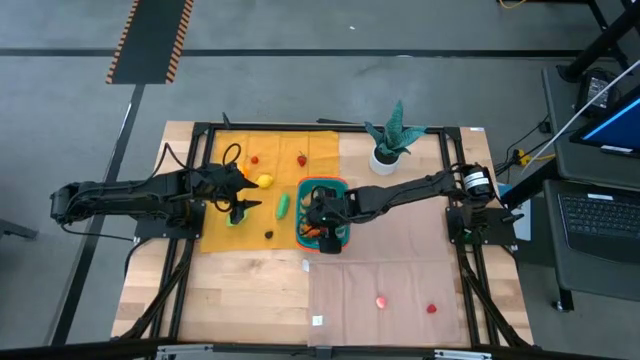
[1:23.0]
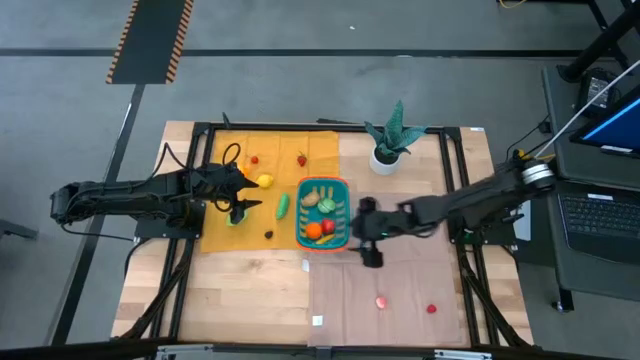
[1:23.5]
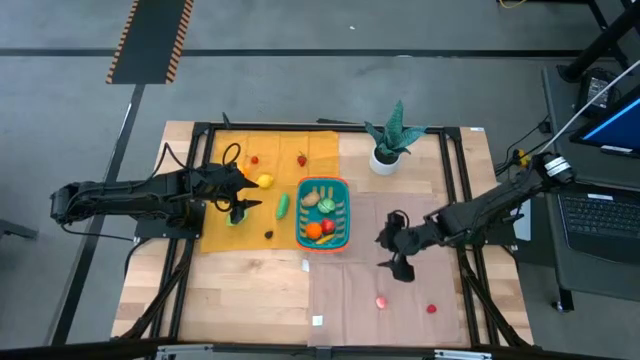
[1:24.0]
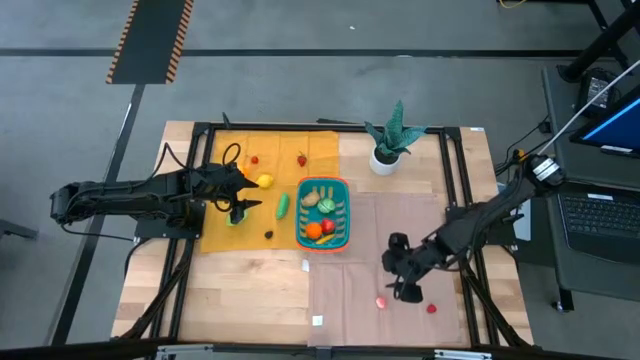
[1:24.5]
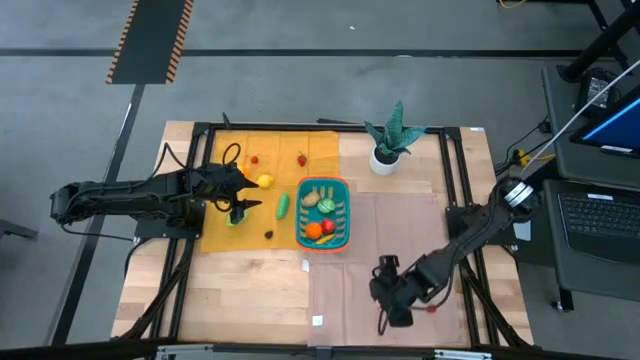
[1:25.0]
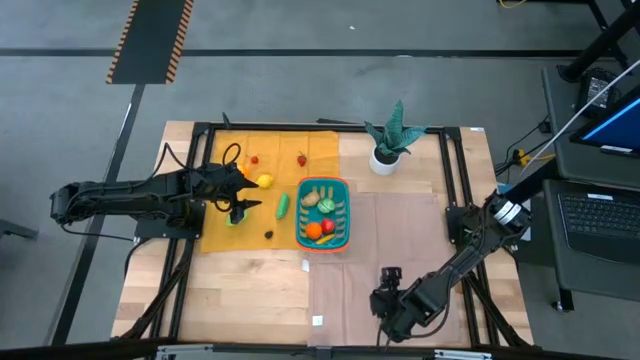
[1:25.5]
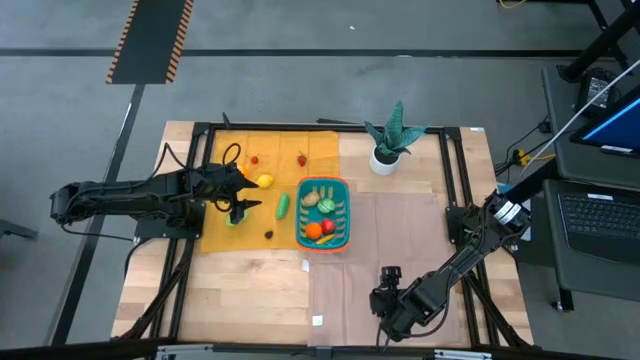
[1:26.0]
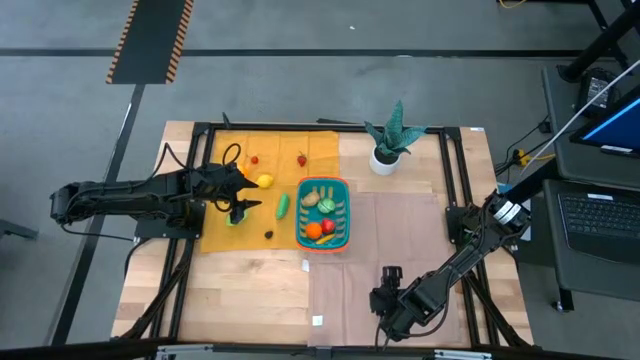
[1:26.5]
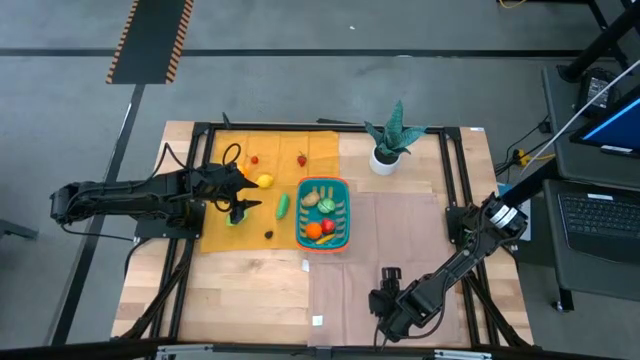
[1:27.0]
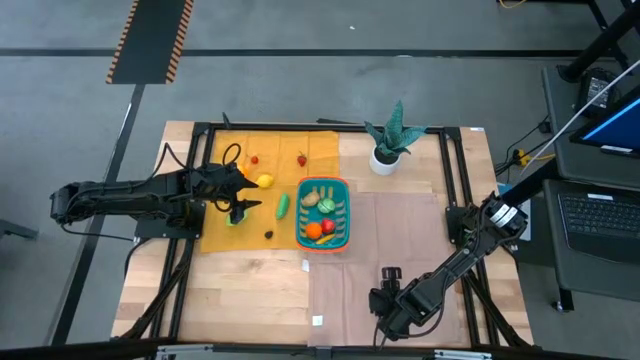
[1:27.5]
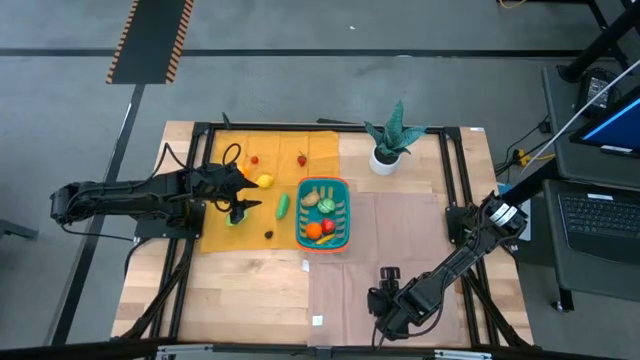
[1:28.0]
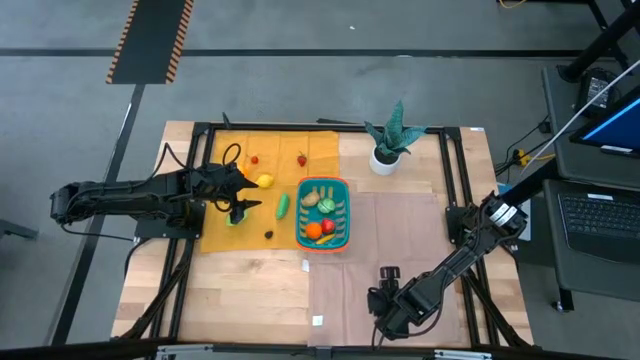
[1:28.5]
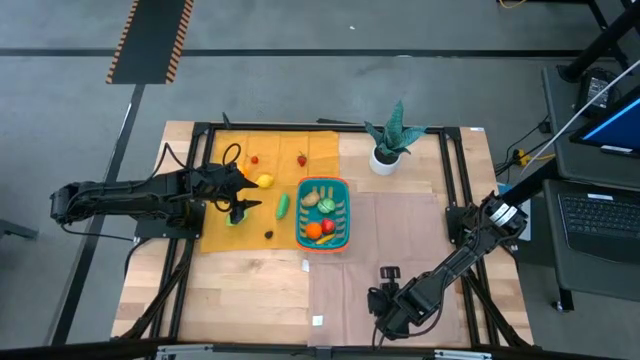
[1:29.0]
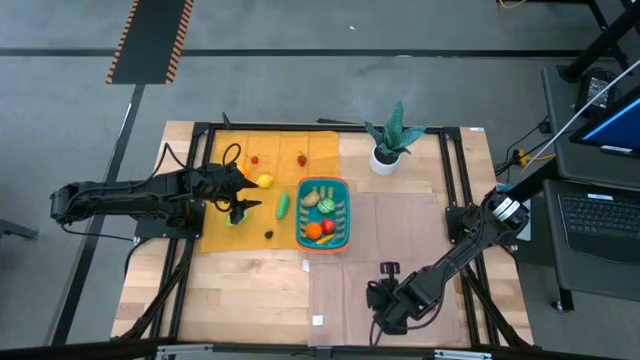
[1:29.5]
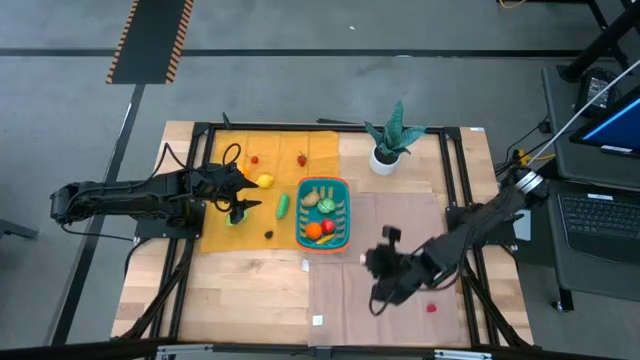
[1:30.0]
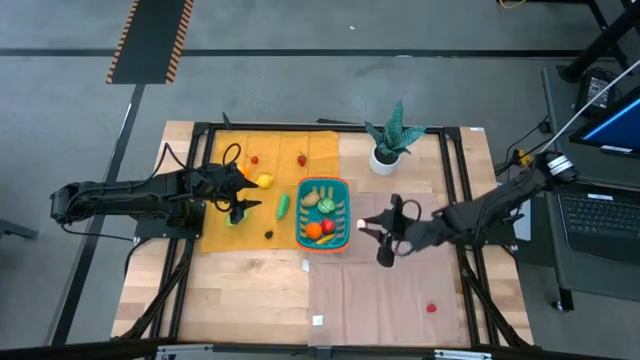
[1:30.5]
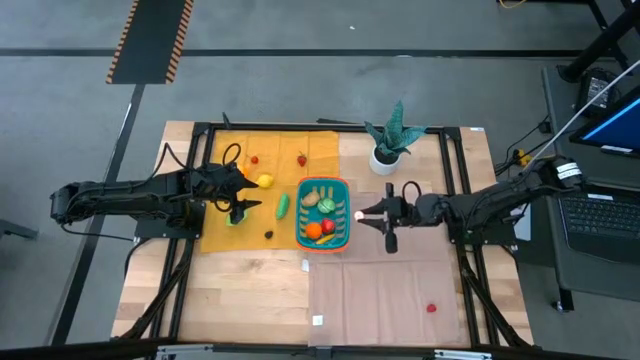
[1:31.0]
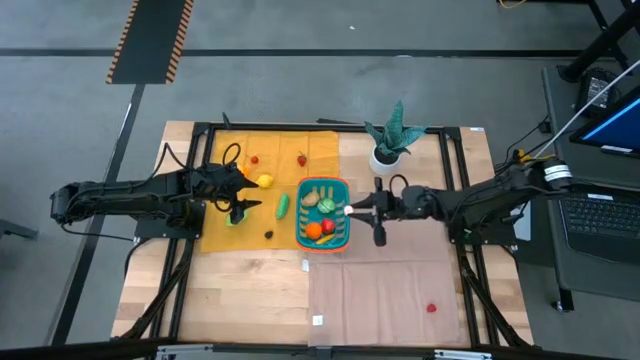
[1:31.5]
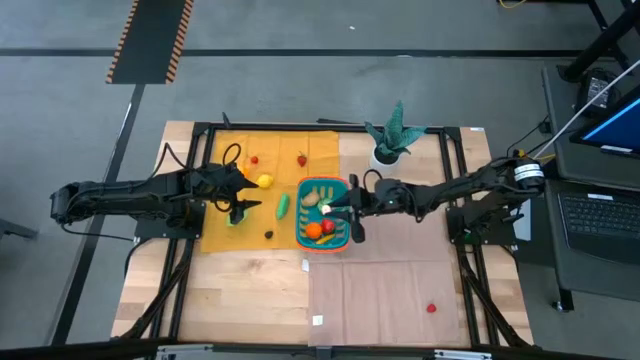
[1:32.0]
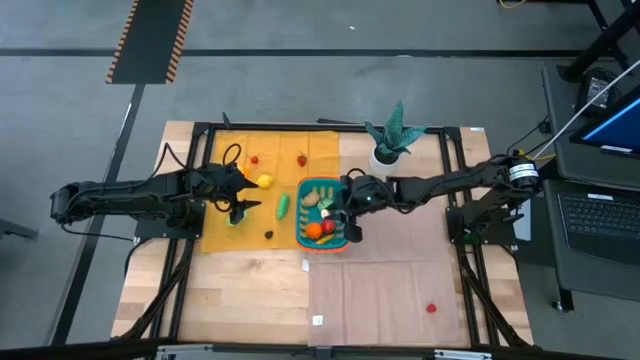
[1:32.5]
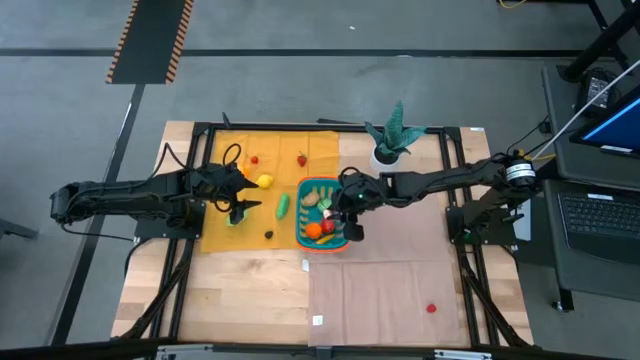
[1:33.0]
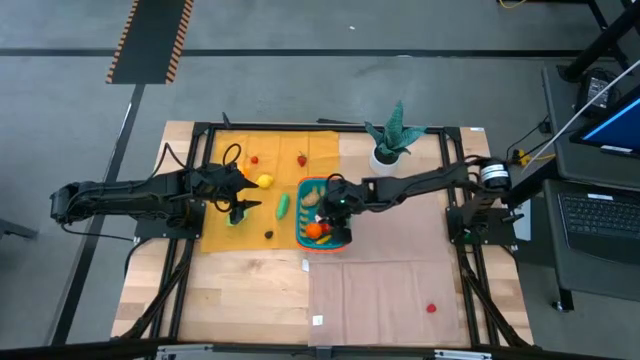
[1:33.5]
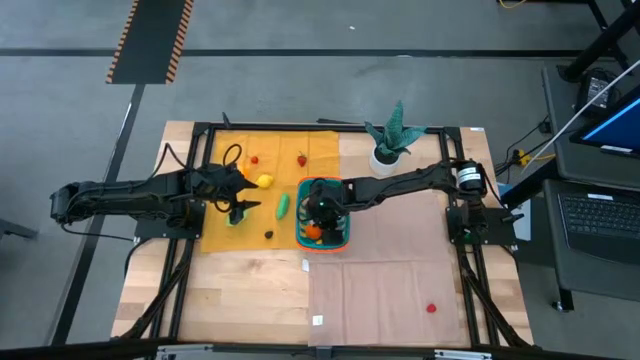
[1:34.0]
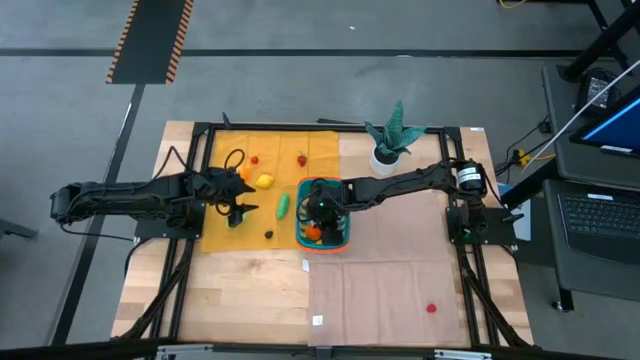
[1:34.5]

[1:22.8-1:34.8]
Task: Pick and placing Produce into tupperware
Put the apricot into the basket

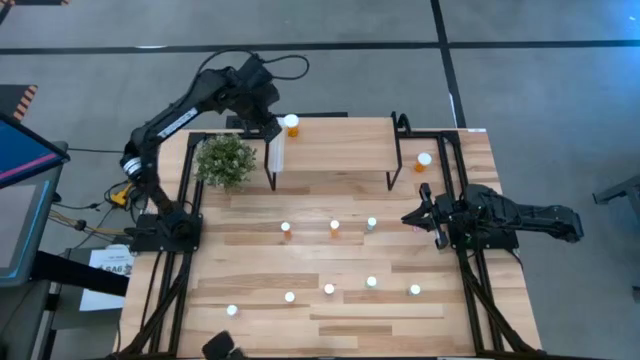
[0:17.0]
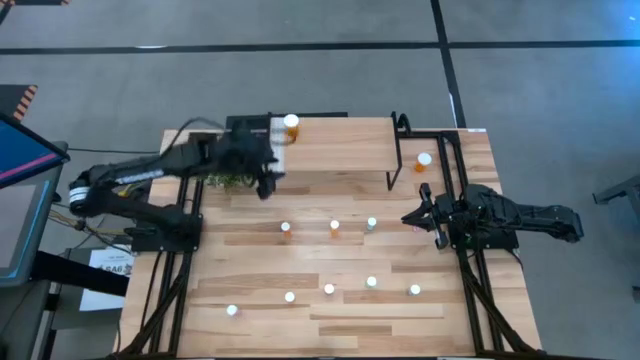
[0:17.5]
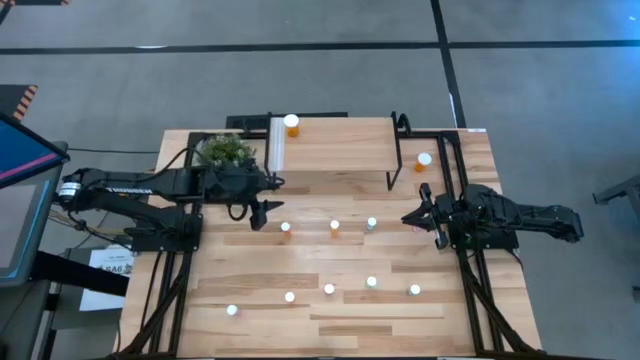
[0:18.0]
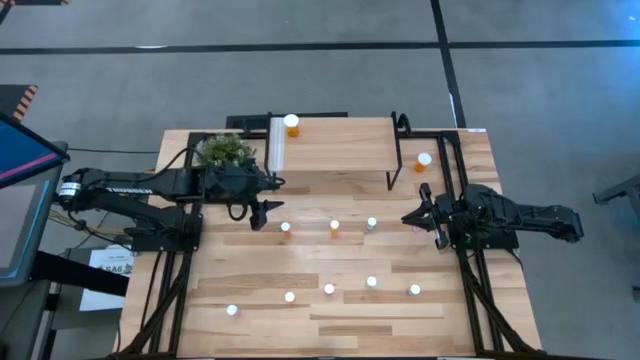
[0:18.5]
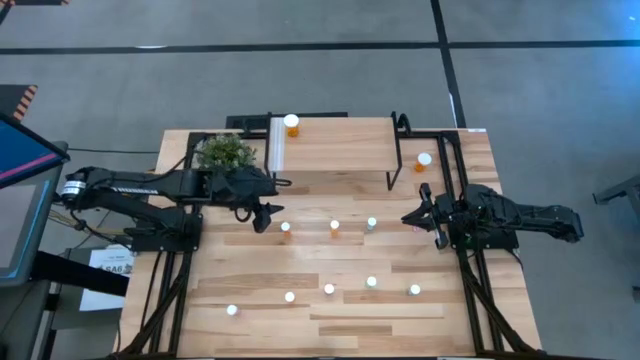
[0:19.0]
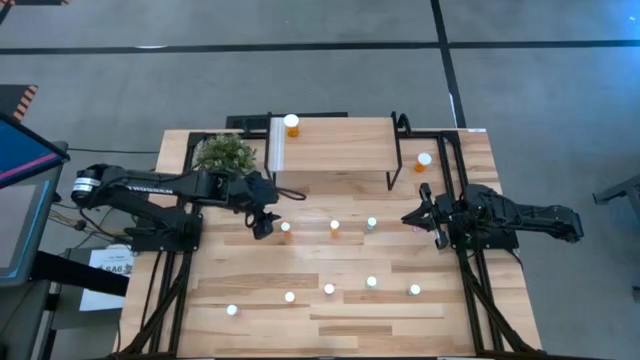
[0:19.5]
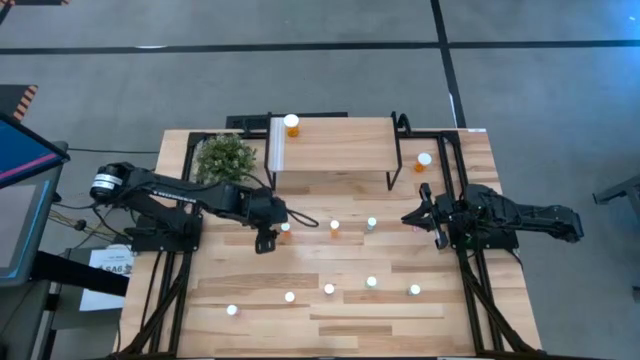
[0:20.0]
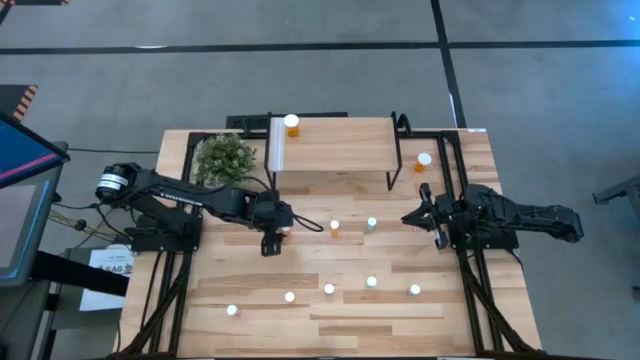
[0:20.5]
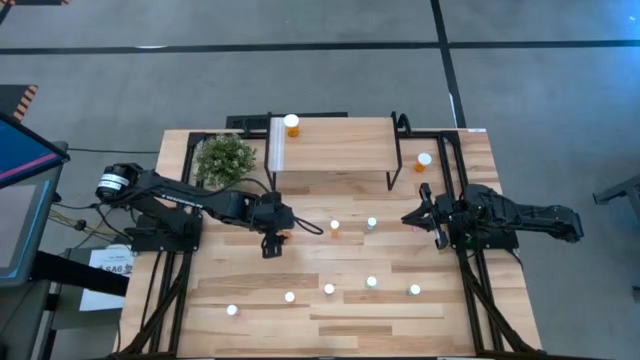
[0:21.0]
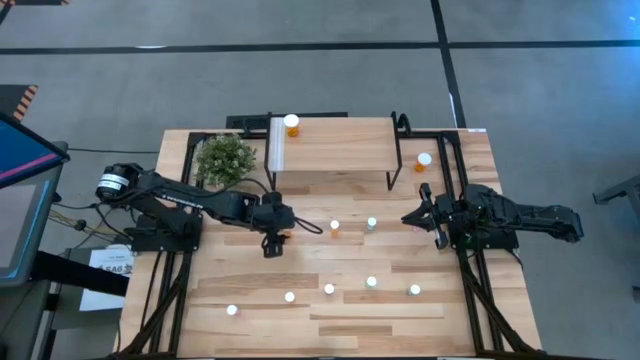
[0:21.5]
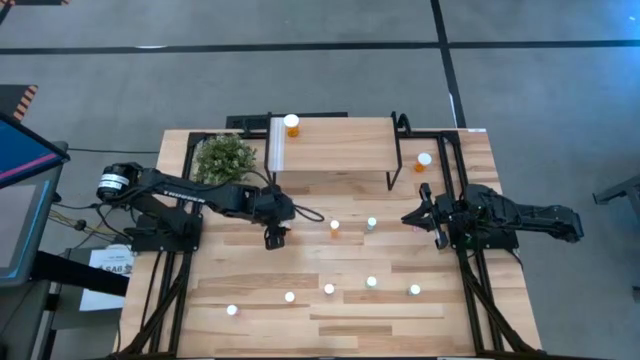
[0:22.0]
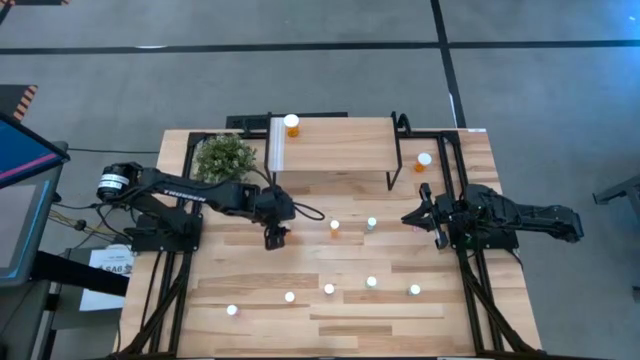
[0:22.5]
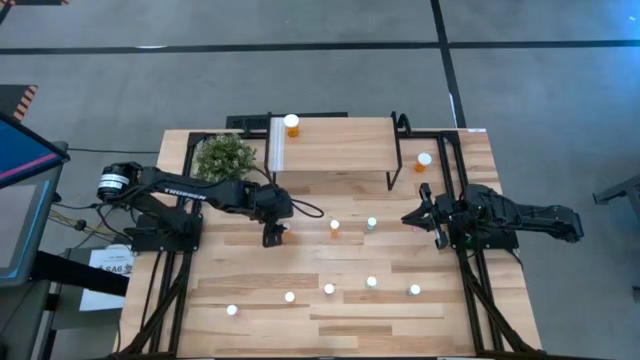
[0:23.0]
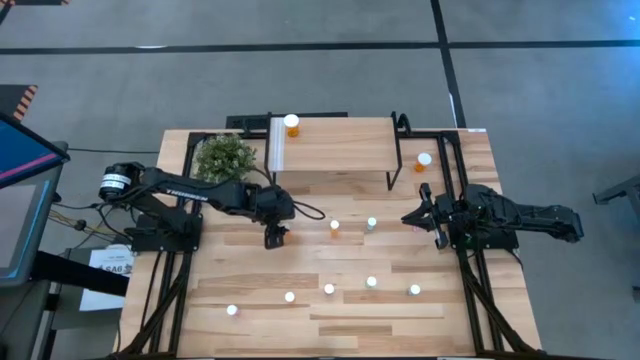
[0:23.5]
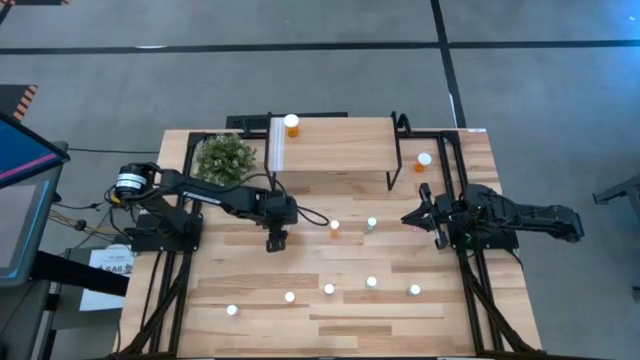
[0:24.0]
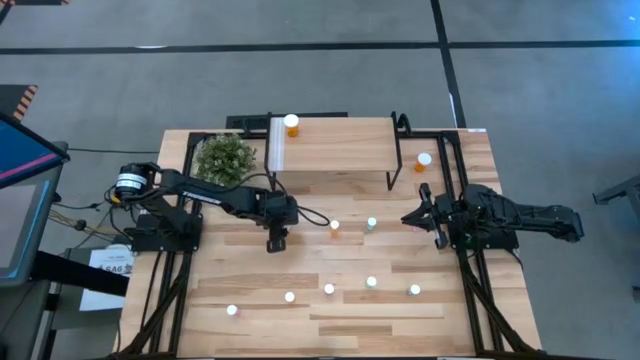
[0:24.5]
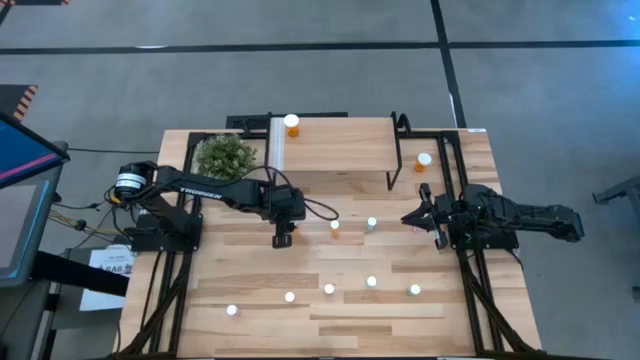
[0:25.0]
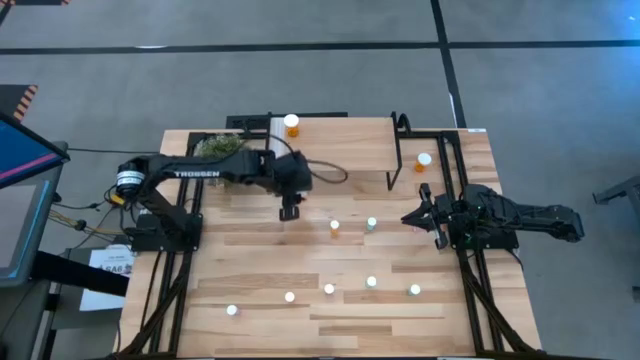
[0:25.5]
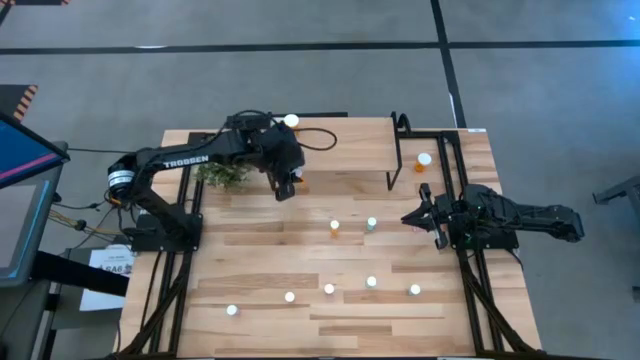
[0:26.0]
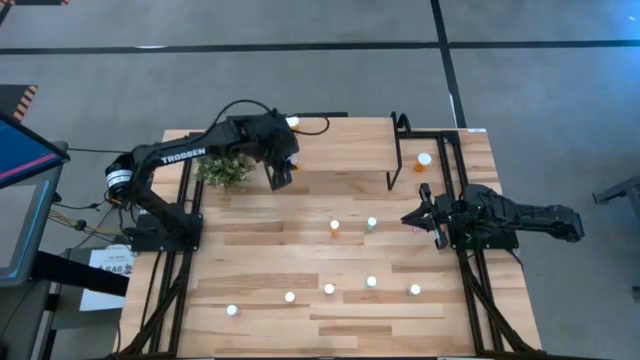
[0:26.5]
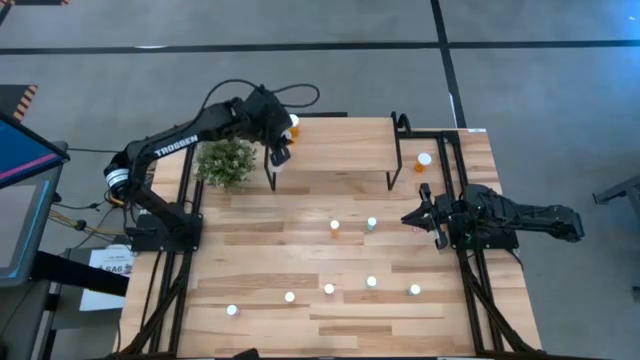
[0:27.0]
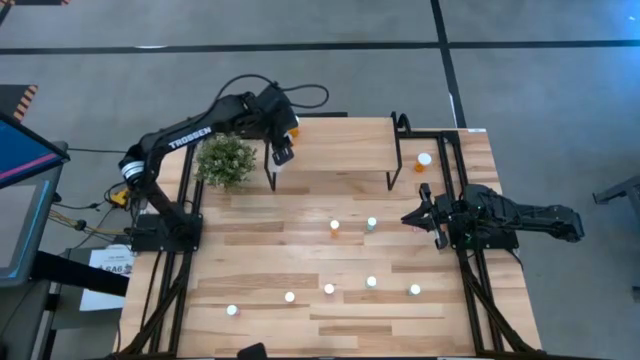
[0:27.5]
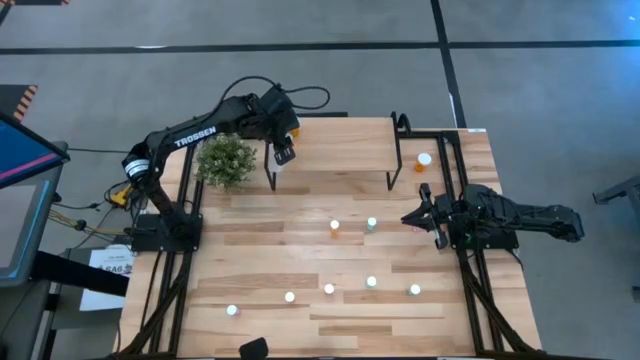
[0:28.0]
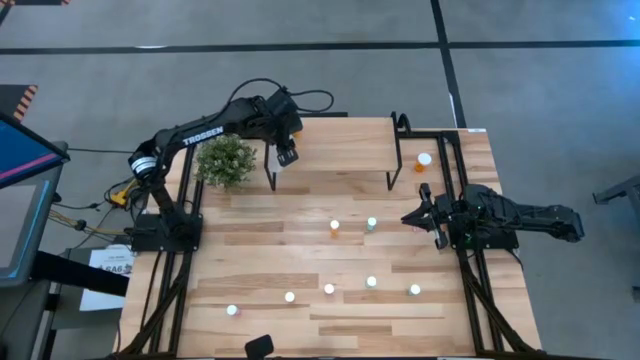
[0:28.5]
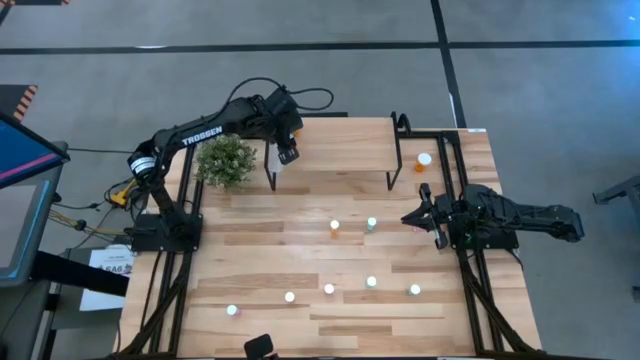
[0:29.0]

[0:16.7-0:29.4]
Task: Pick and place medicine bottles onto shelf by color
Put the small top right orange pill bottle on the shelf
